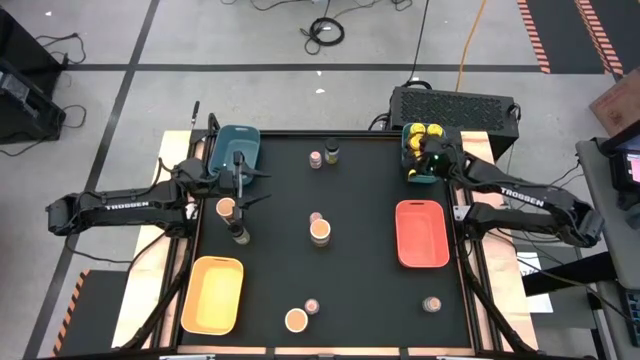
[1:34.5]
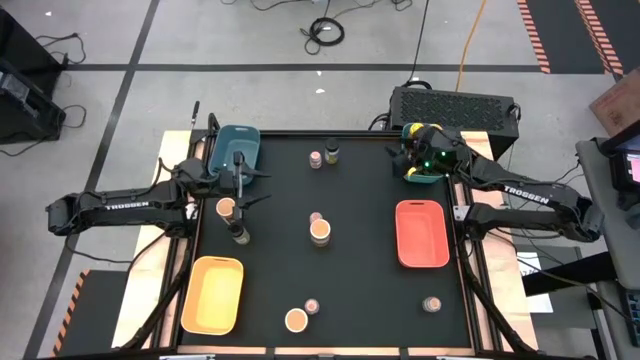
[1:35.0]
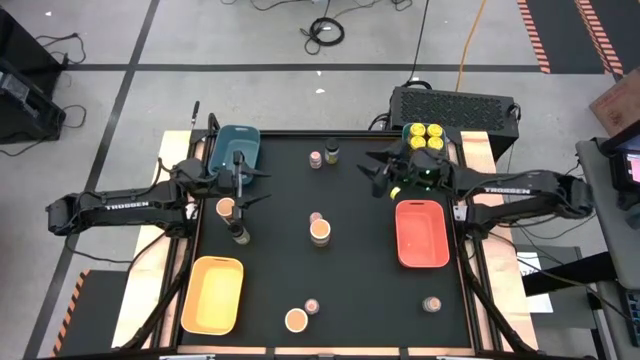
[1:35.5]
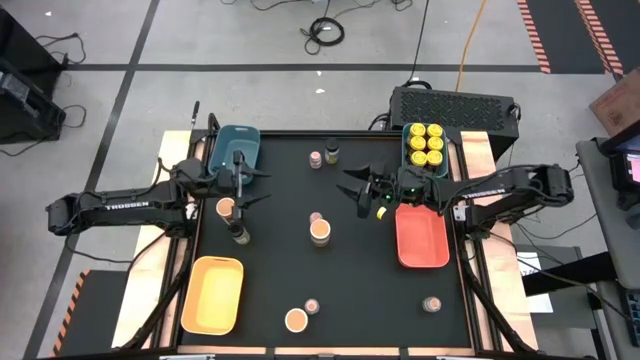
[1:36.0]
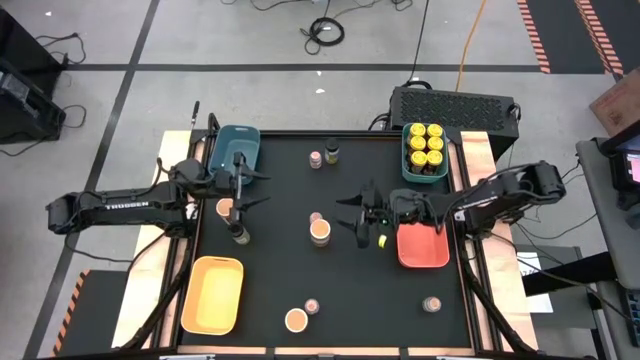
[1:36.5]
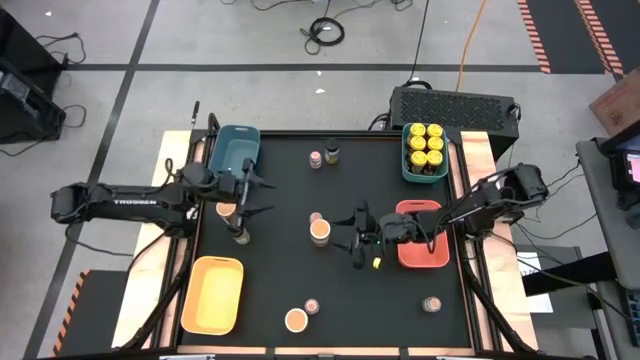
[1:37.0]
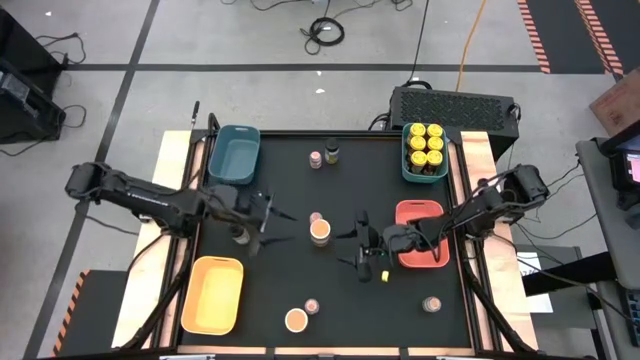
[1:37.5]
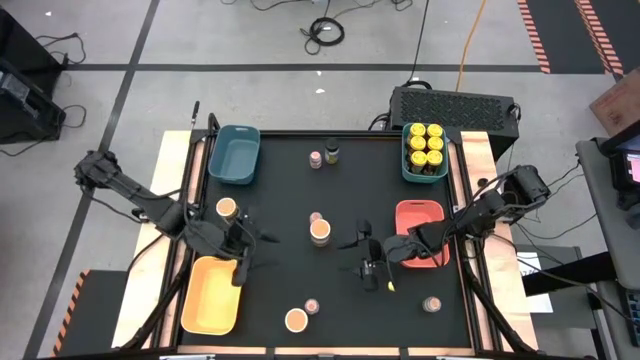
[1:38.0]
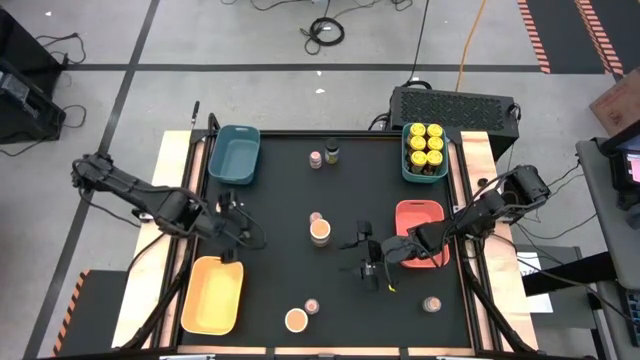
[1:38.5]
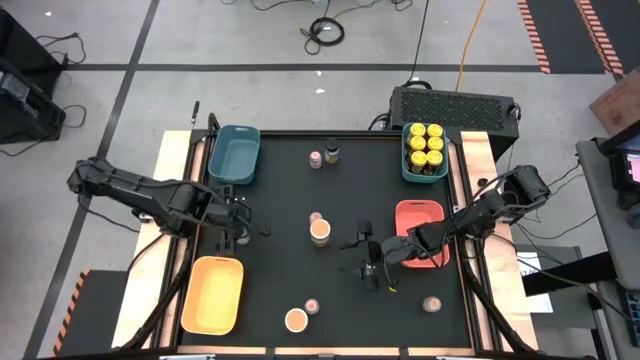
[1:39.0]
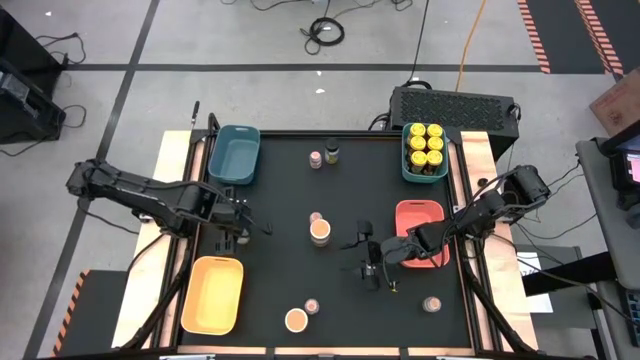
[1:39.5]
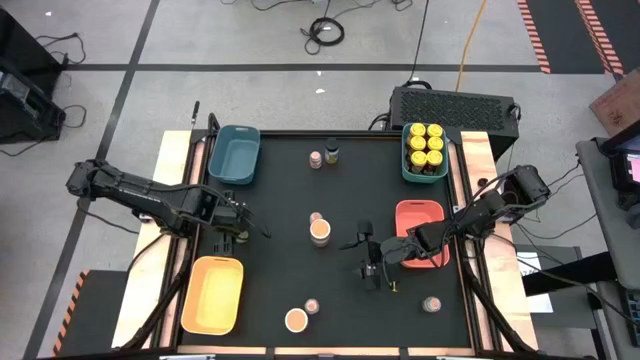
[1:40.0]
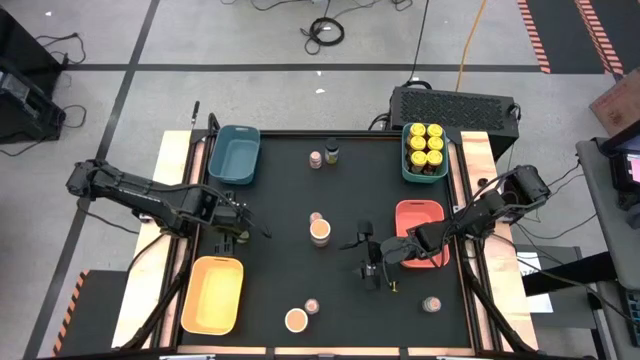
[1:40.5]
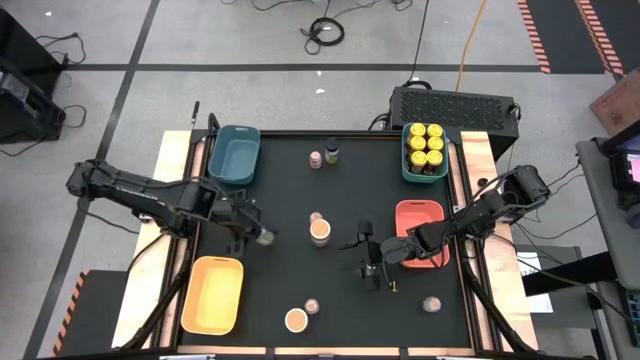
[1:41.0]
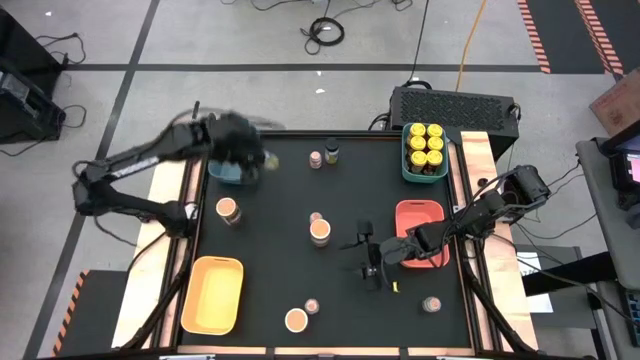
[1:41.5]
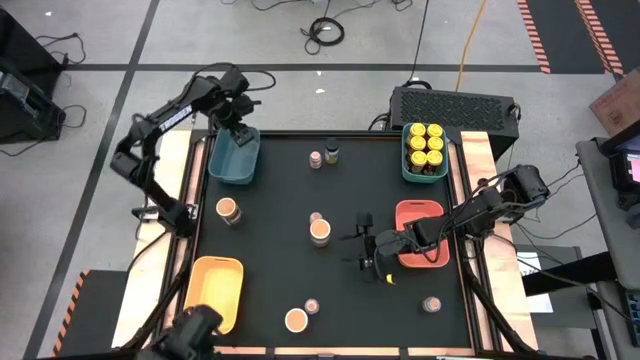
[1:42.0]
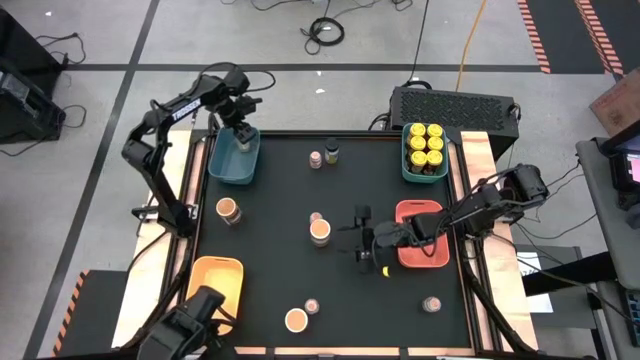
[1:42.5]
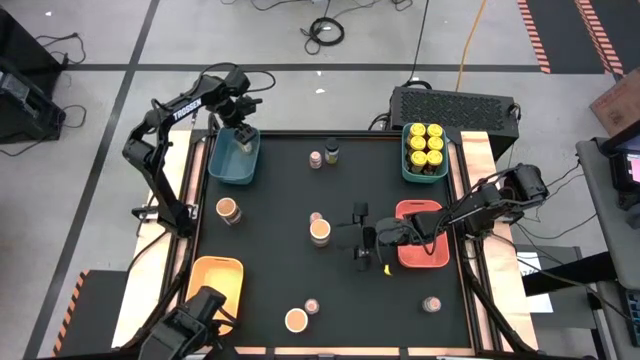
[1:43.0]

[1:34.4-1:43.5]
Task: Sort spices by type
Put the black spice bottle into the blue bin

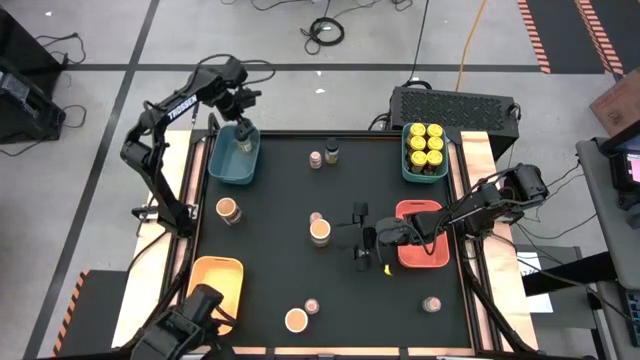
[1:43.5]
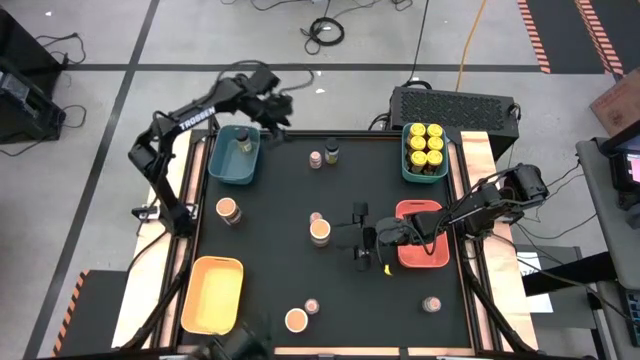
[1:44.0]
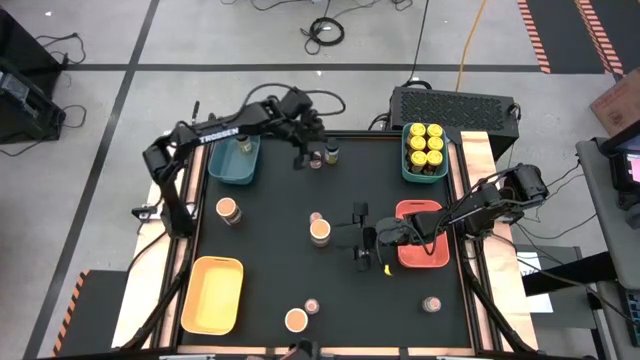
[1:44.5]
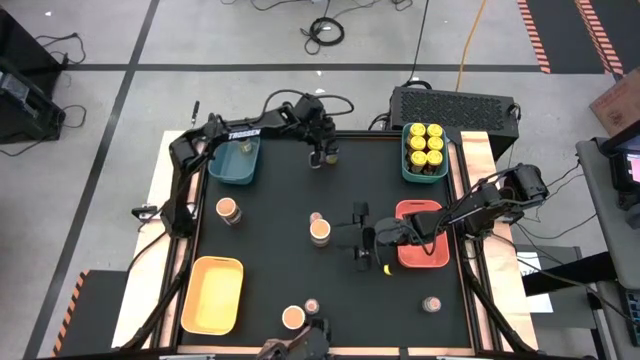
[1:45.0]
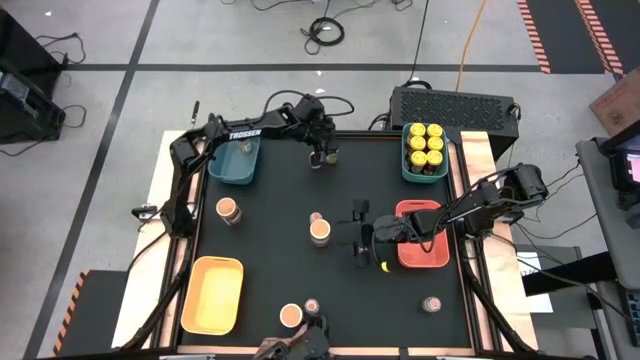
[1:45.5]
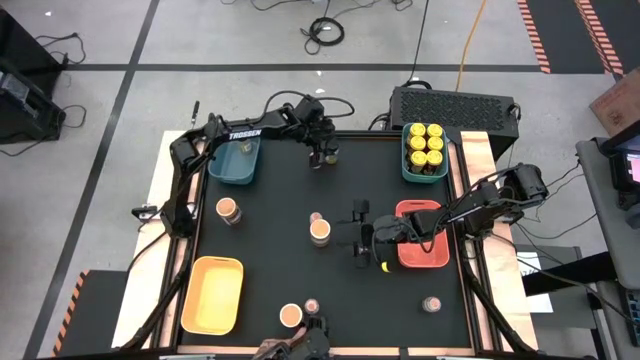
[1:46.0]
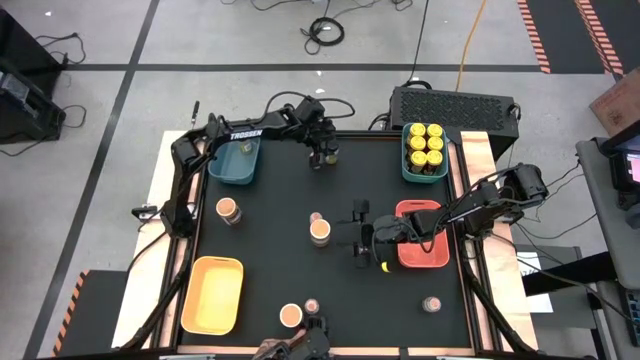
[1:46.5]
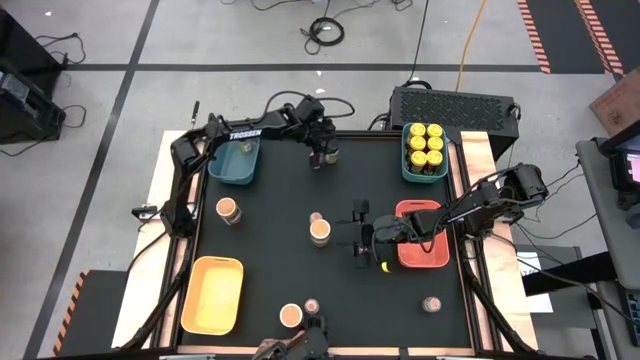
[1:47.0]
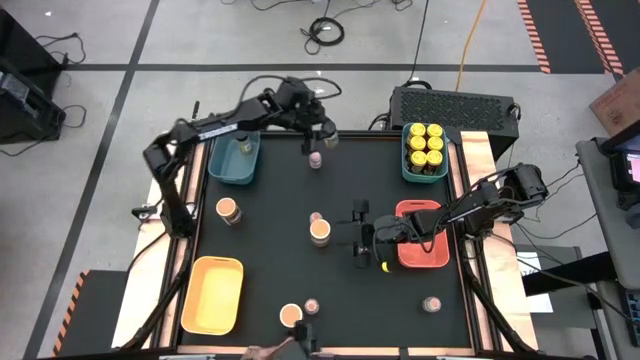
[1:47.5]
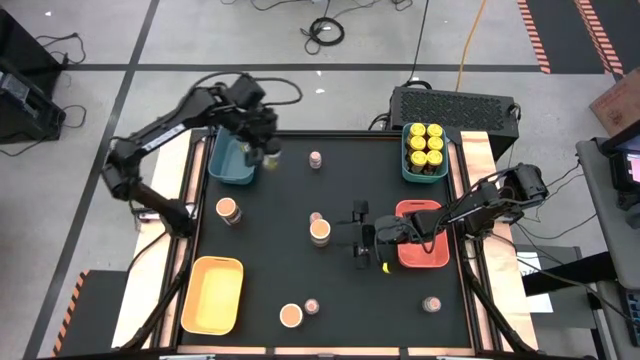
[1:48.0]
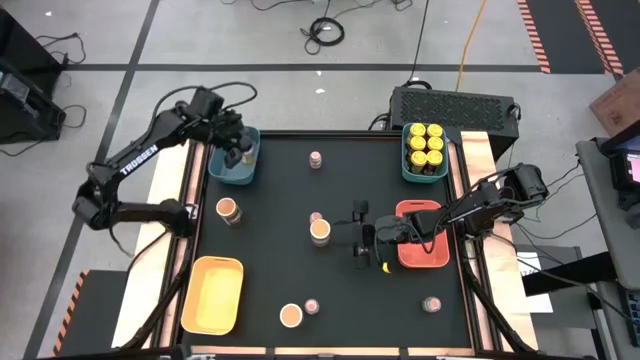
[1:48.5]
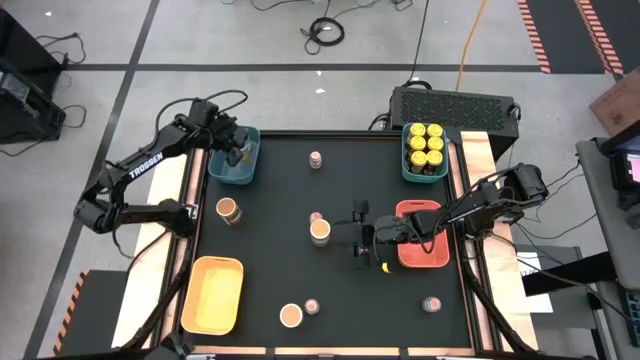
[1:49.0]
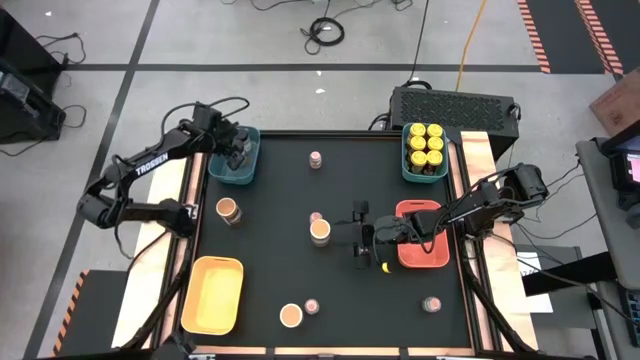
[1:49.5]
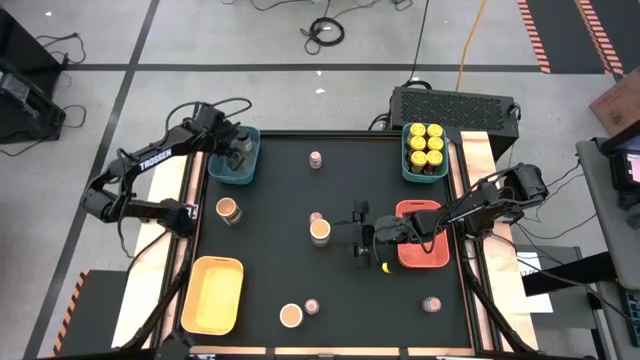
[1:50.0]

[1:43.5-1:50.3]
Put the black spice bottle into the blue bin

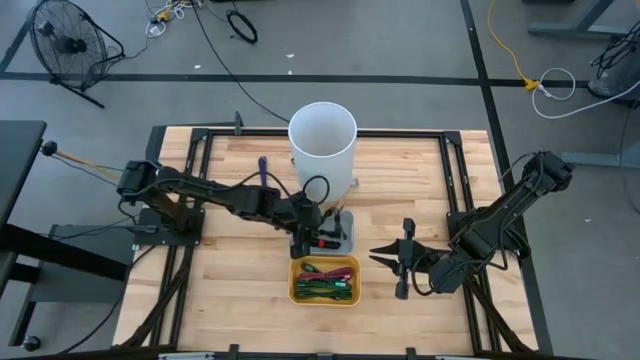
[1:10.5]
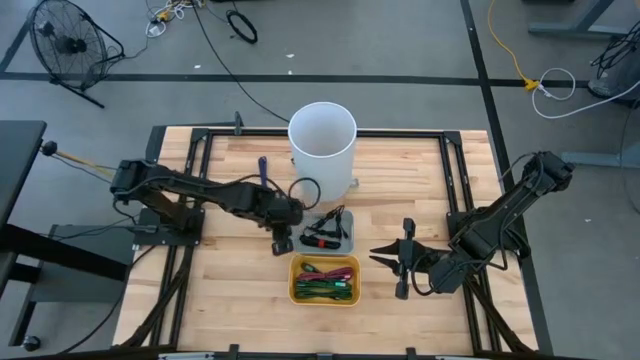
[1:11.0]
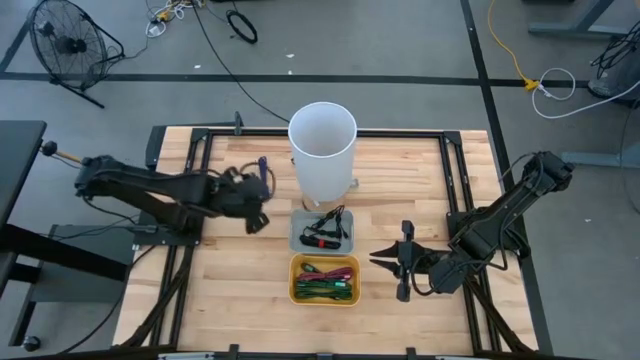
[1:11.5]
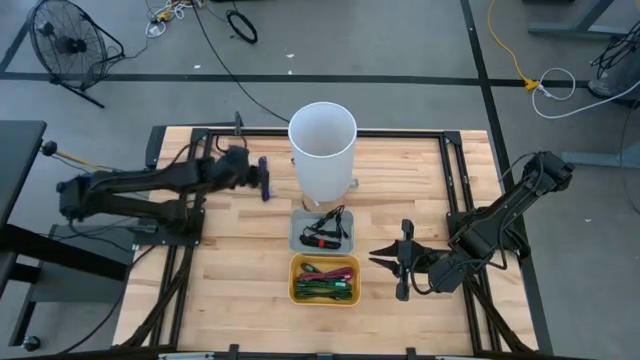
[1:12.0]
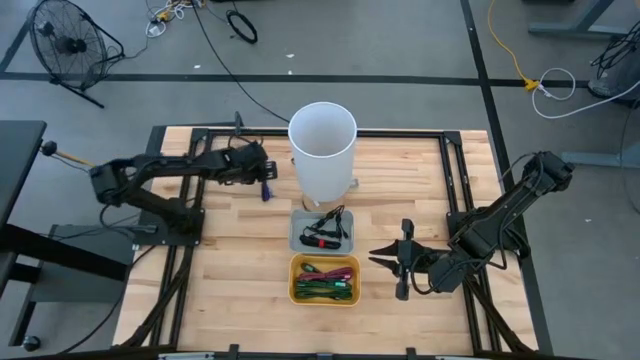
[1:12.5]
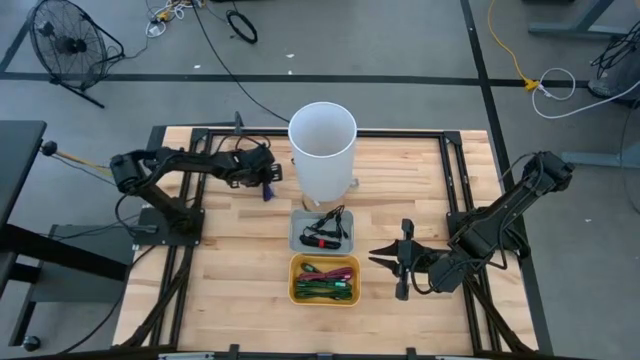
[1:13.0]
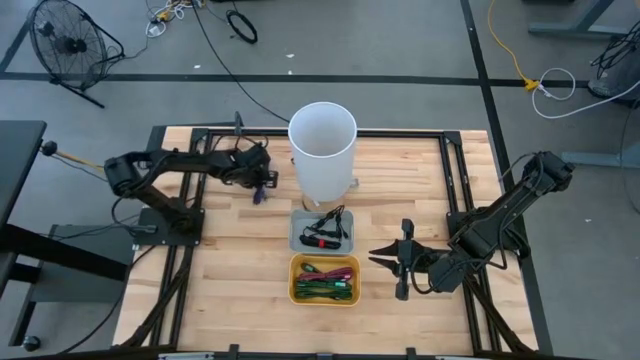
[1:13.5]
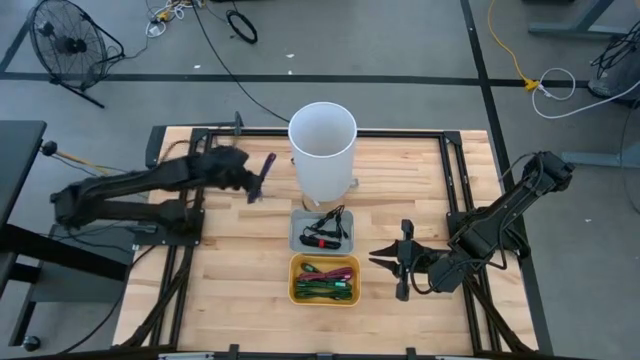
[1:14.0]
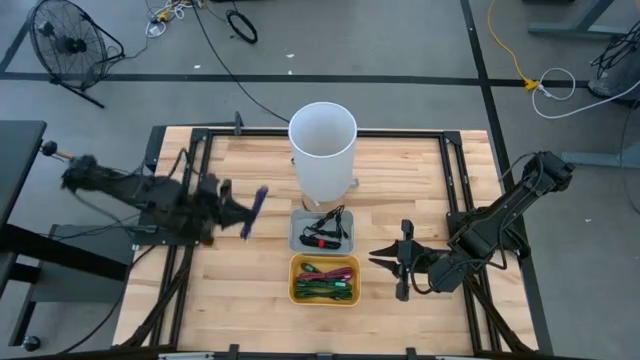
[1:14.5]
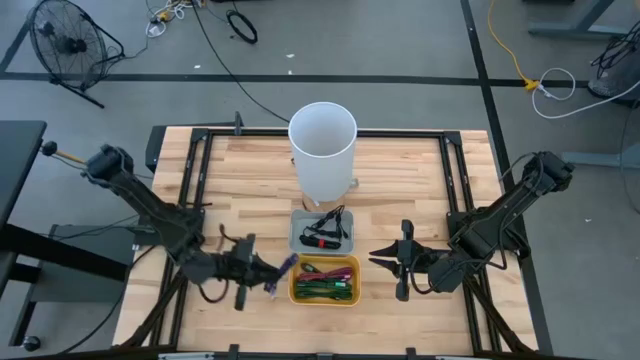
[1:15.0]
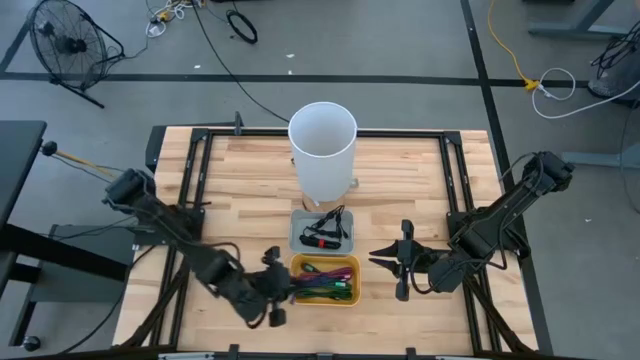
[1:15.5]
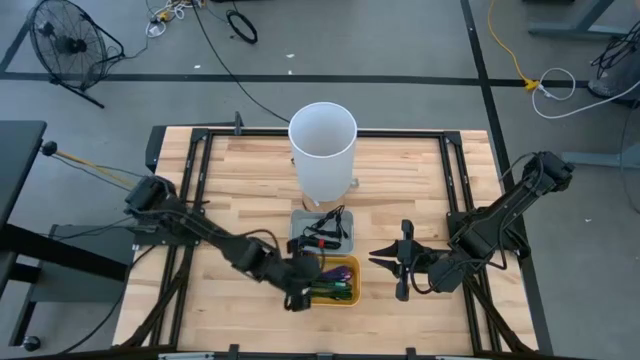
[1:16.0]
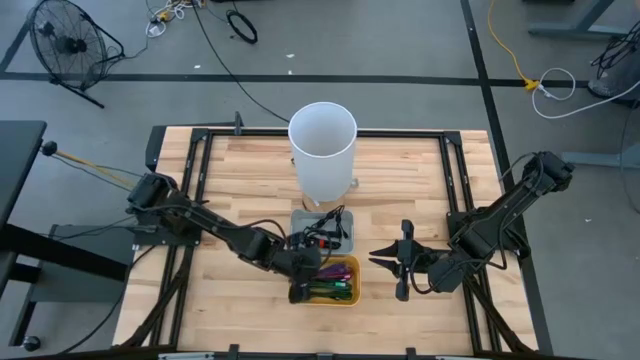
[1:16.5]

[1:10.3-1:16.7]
Task: Pick & Place USB Port
Put the purple charger cable into the yellow bin
